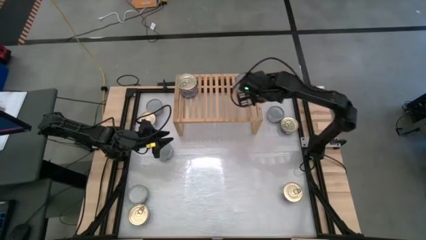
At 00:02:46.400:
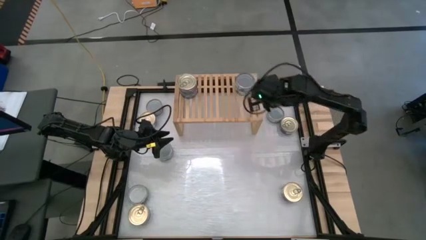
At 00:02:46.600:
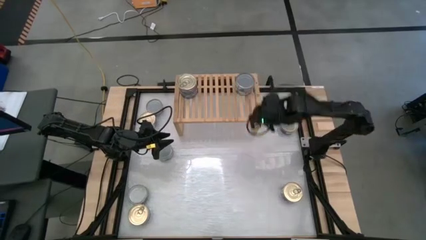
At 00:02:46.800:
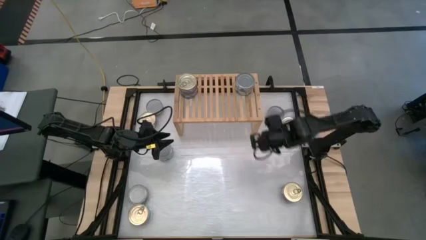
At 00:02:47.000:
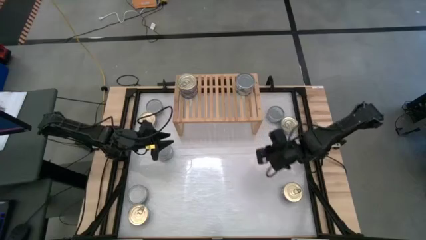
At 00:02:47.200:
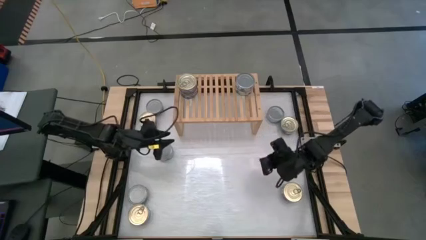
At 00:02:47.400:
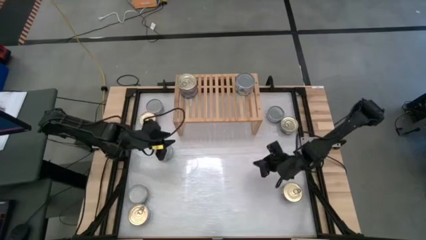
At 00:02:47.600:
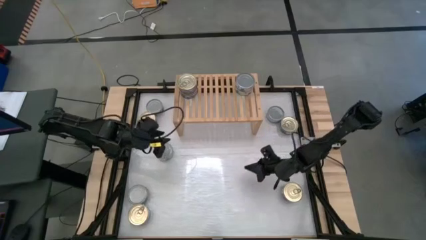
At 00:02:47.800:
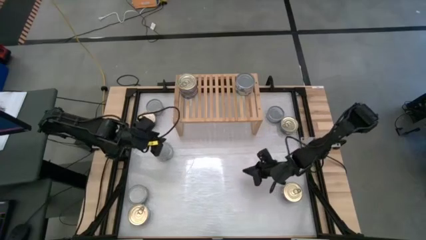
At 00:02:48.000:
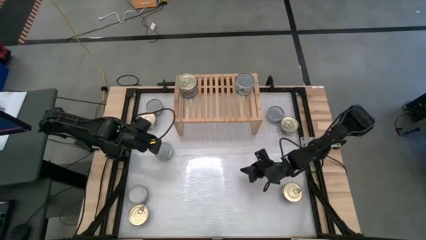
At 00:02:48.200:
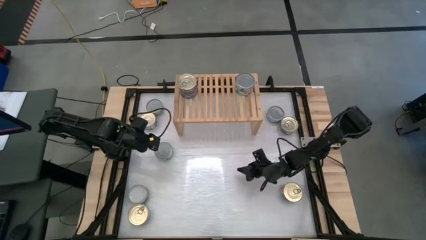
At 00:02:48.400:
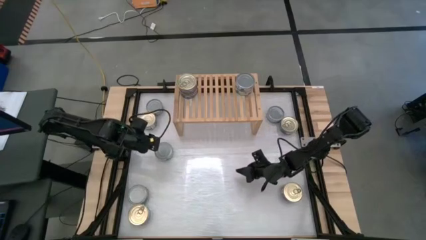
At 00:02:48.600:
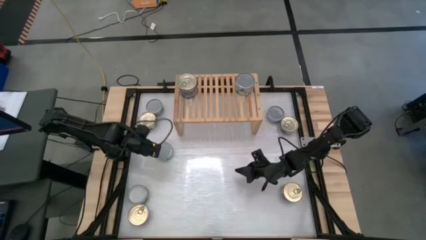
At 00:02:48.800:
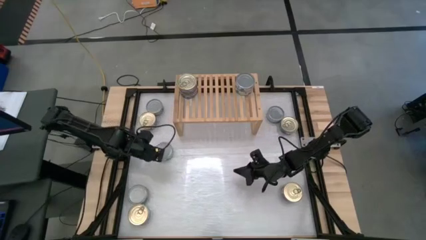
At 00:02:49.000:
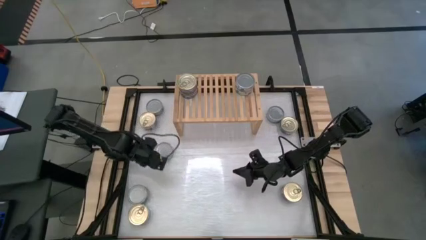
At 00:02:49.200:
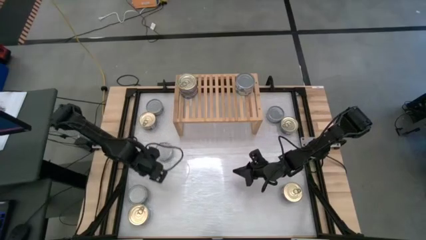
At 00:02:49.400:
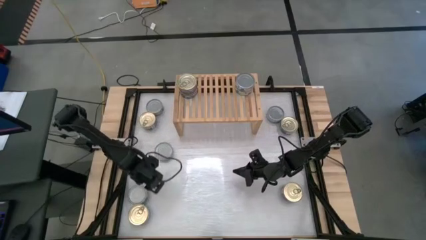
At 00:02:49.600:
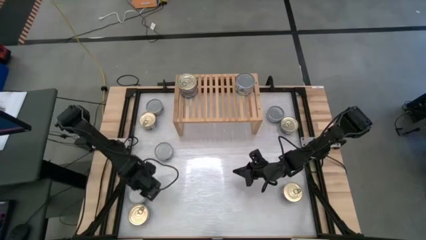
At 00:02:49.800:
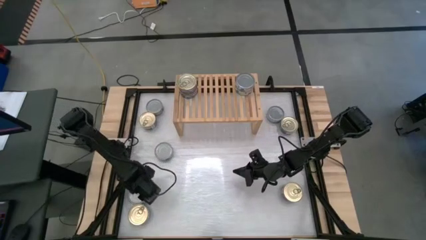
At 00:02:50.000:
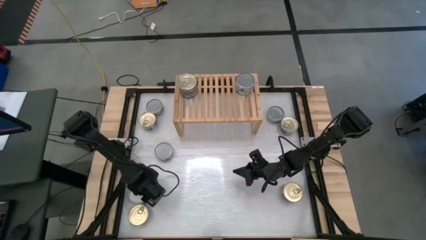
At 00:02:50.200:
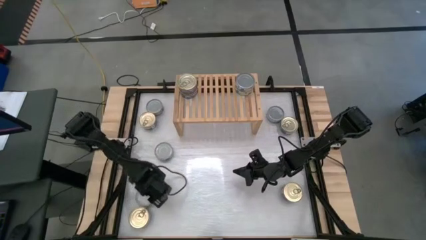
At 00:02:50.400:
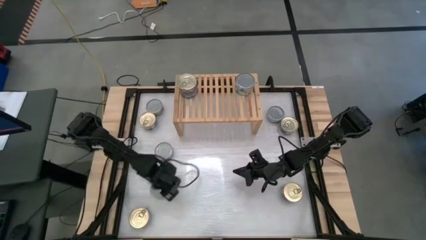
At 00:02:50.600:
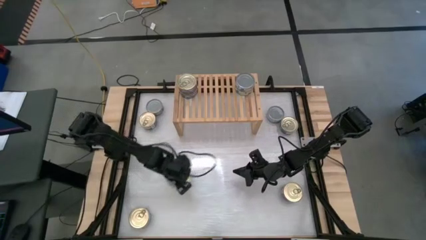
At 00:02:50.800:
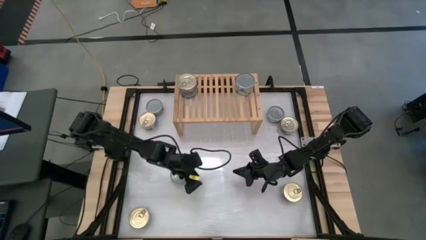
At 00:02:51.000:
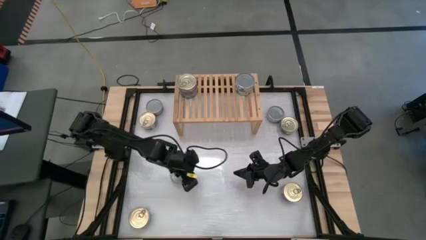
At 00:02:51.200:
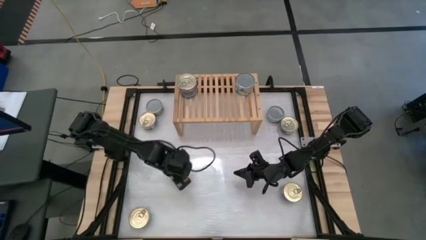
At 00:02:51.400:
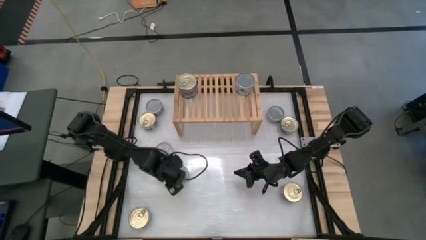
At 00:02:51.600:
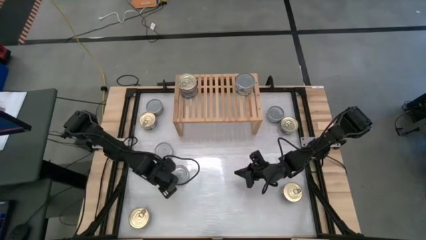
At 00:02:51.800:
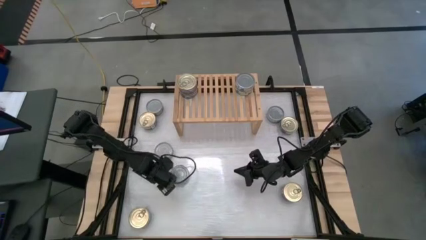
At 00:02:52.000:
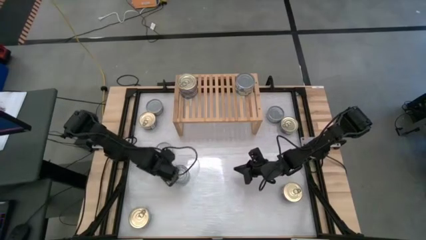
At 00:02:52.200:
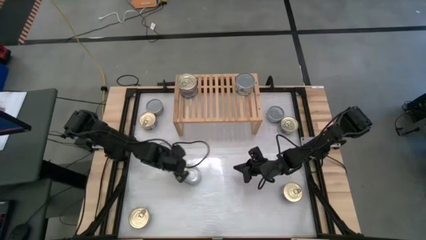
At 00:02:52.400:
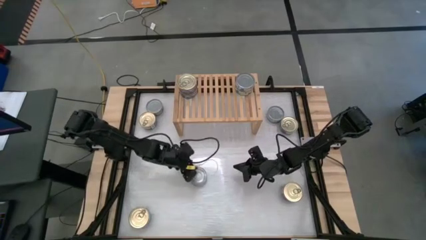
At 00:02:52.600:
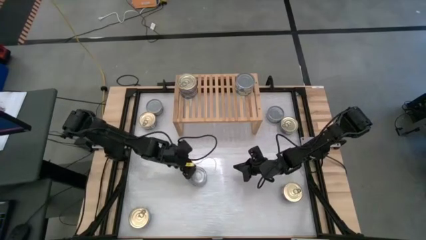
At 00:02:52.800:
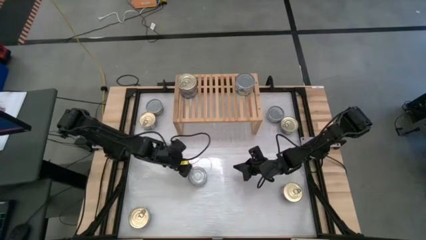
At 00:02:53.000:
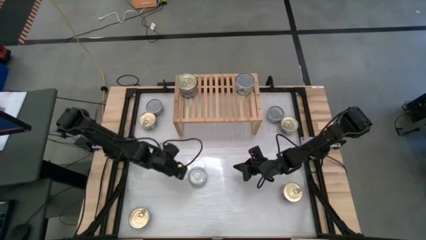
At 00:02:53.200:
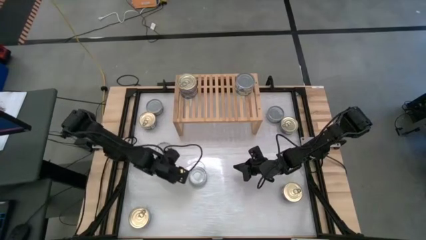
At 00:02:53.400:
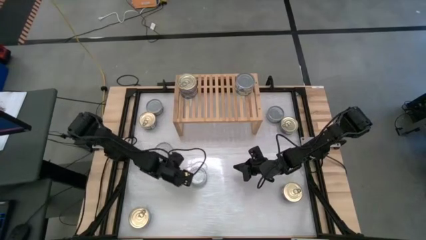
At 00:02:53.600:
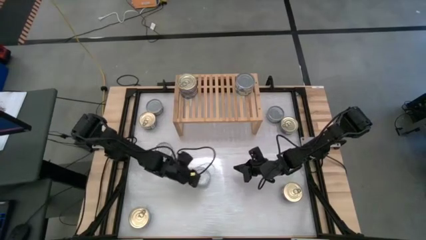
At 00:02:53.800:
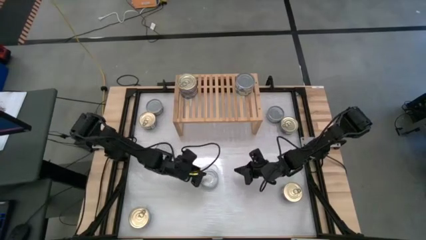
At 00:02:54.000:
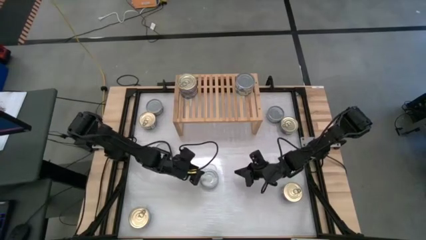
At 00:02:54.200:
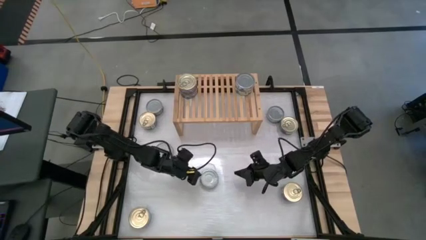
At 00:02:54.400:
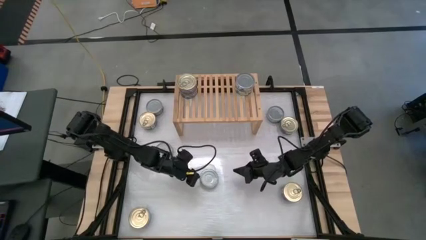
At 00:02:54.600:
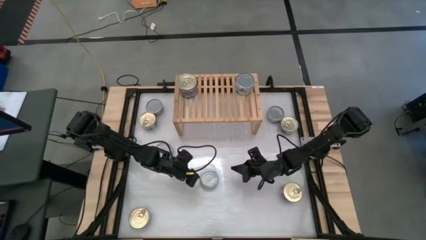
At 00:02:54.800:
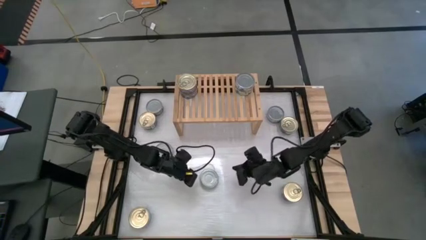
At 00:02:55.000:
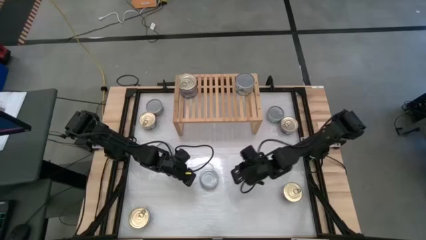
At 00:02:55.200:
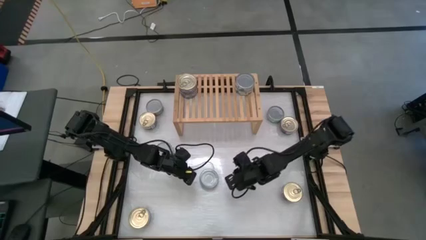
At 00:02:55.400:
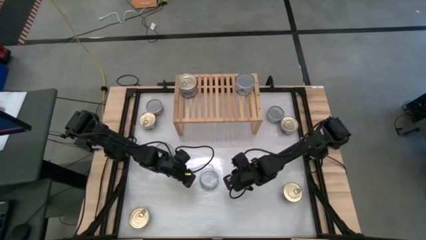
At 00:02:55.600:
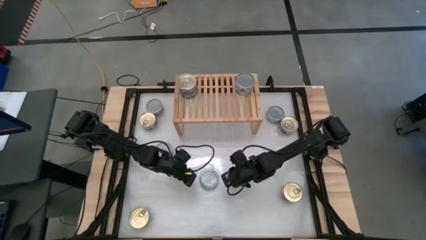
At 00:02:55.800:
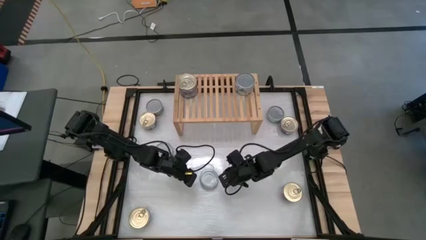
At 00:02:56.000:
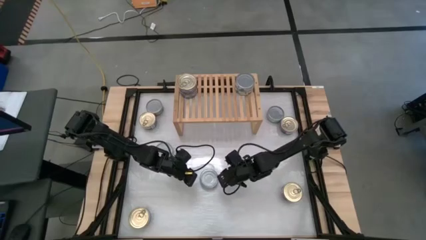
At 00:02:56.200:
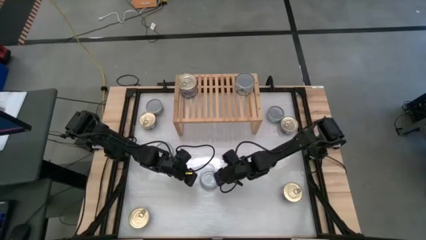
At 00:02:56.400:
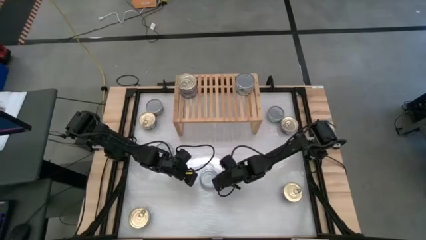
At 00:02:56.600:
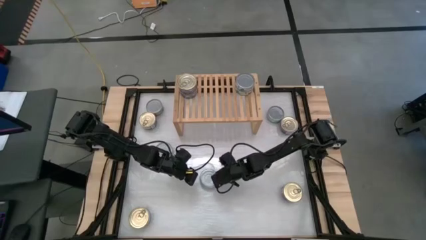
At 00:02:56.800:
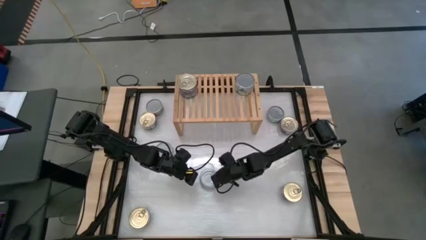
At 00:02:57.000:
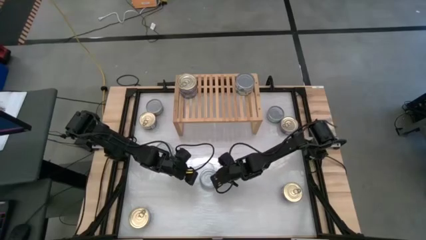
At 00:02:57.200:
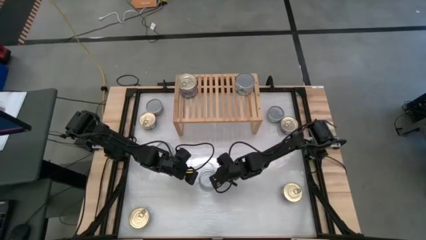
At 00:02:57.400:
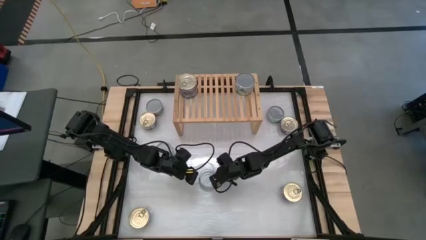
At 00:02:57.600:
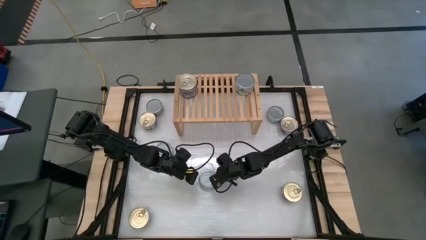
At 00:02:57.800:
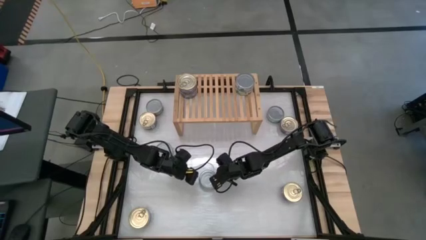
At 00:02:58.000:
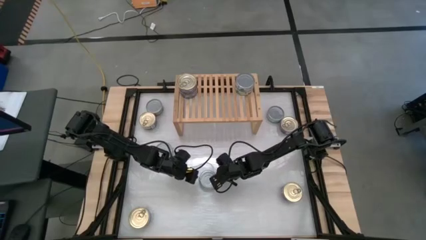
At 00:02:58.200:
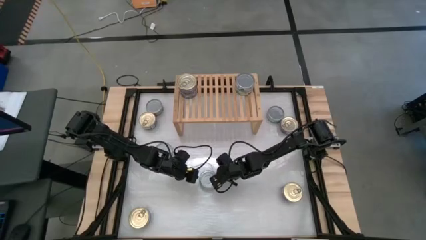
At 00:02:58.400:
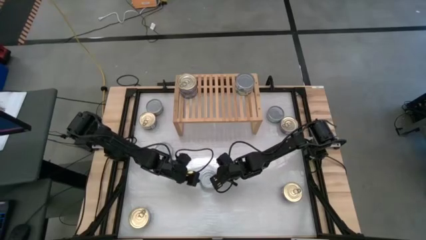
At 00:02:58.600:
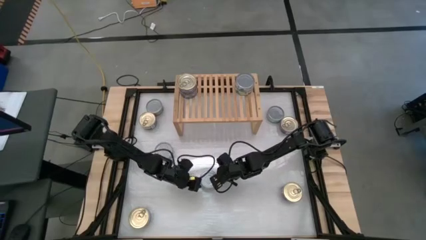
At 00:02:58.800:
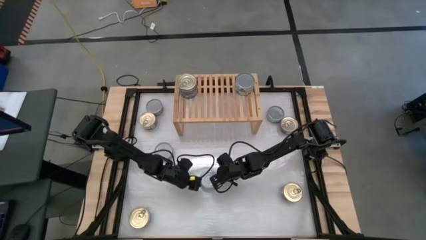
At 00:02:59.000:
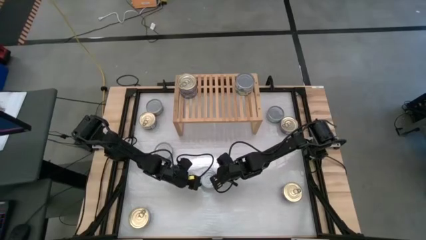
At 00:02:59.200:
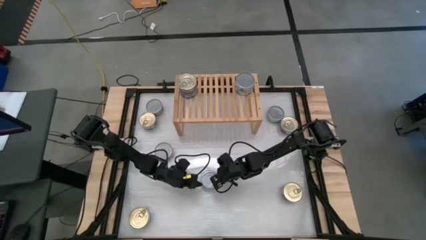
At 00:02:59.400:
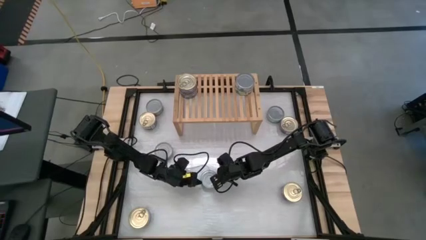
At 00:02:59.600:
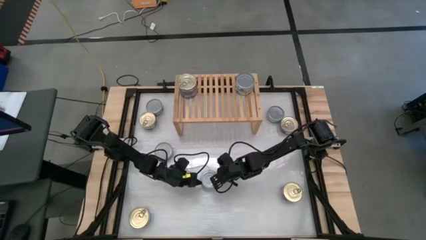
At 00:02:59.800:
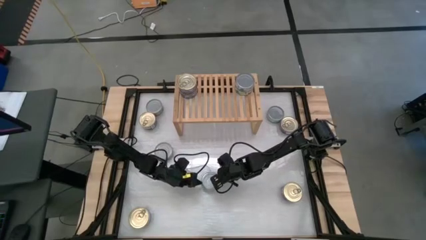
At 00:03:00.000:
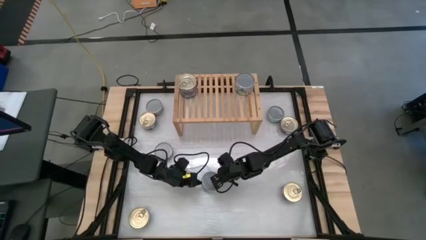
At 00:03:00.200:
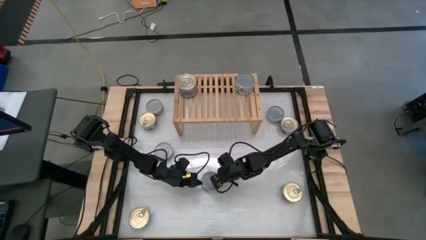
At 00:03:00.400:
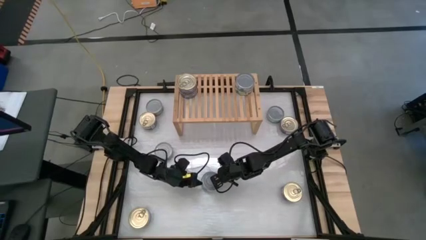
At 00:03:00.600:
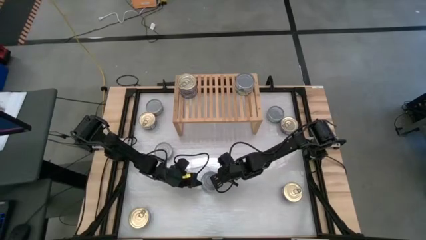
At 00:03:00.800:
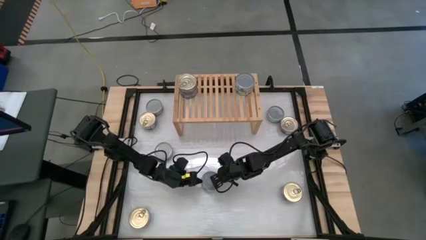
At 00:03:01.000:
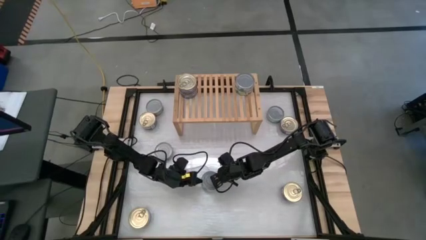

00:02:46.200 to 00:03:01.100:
Task: Stack canned seafood by type on shelf
Put the green tuna can on the shelf aligned with the other green tuna cans
